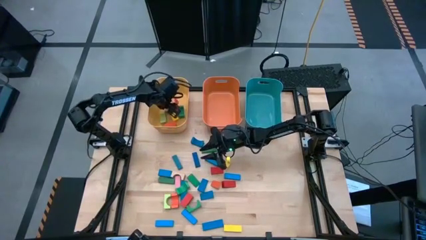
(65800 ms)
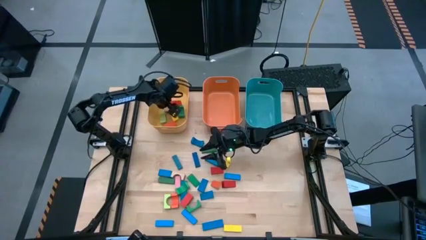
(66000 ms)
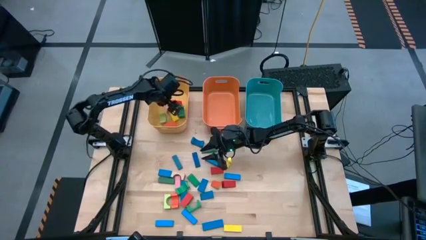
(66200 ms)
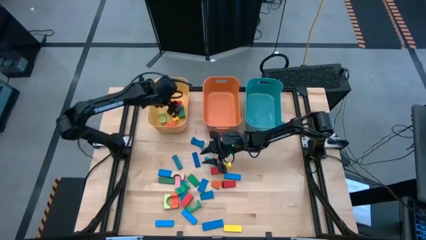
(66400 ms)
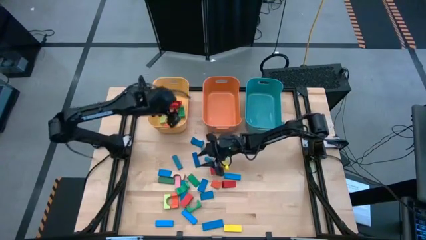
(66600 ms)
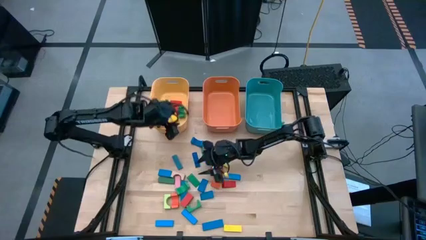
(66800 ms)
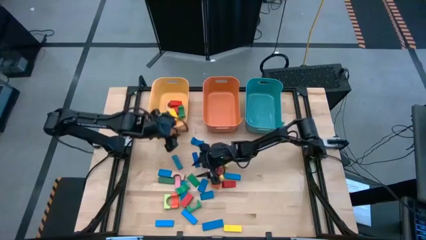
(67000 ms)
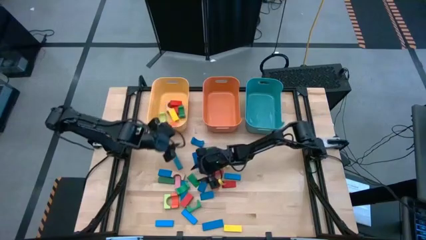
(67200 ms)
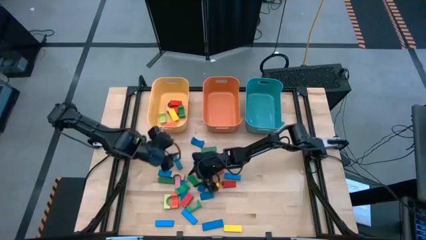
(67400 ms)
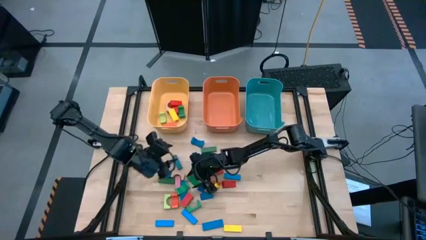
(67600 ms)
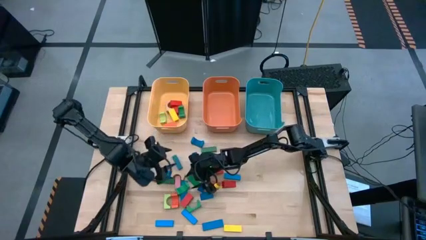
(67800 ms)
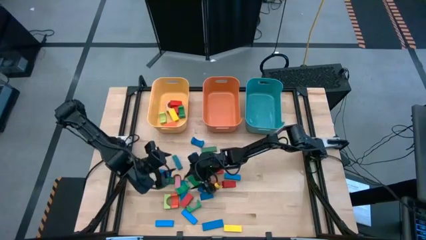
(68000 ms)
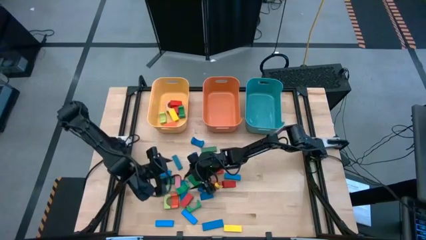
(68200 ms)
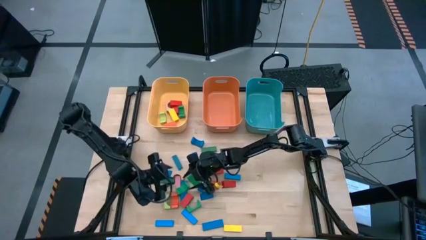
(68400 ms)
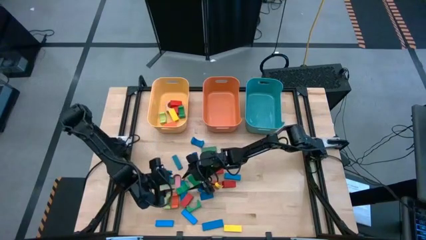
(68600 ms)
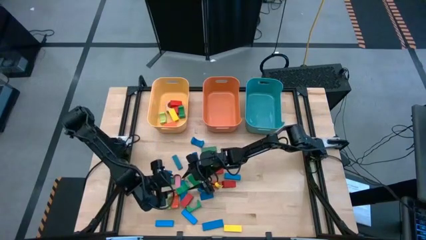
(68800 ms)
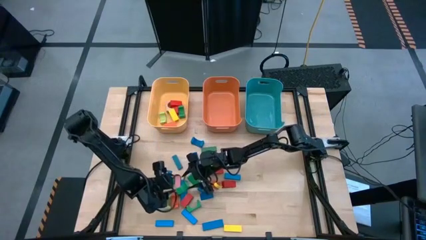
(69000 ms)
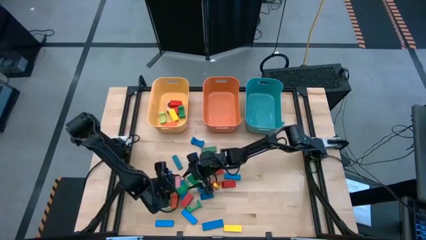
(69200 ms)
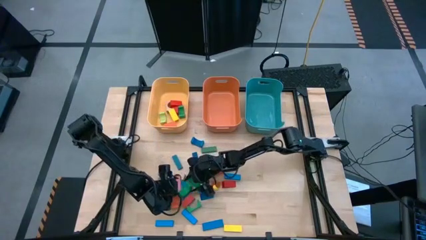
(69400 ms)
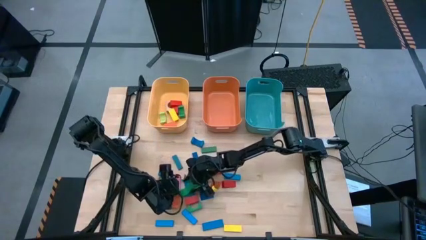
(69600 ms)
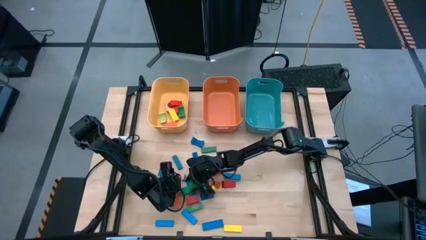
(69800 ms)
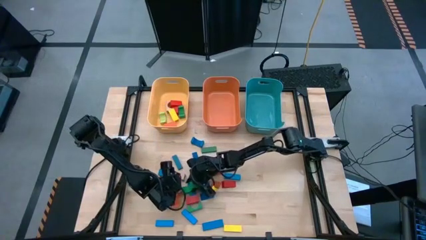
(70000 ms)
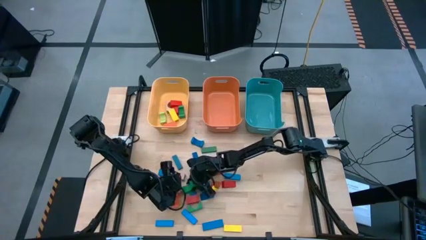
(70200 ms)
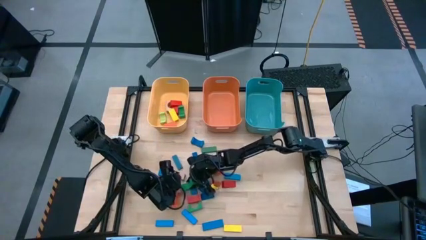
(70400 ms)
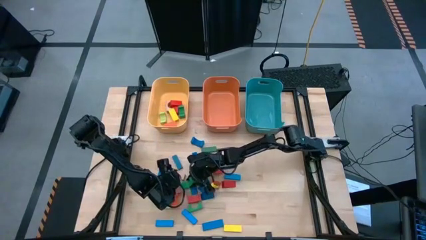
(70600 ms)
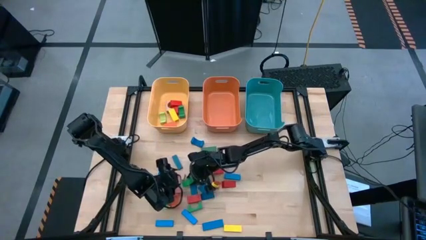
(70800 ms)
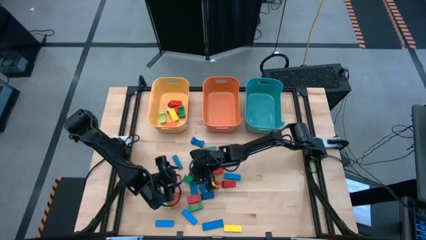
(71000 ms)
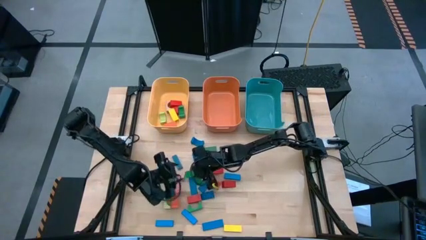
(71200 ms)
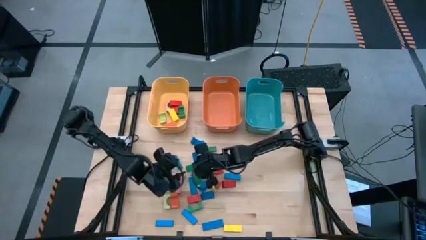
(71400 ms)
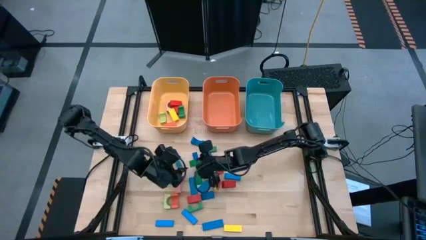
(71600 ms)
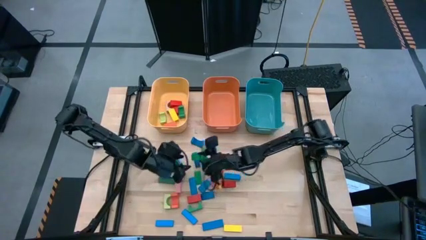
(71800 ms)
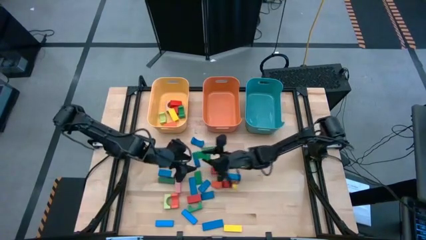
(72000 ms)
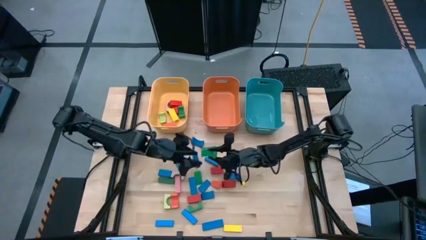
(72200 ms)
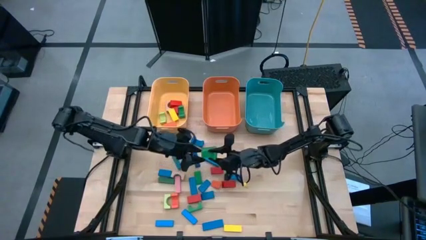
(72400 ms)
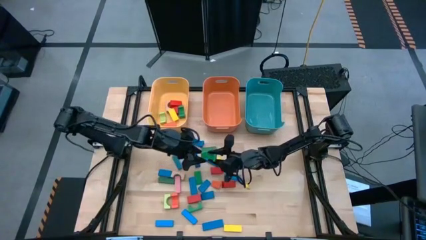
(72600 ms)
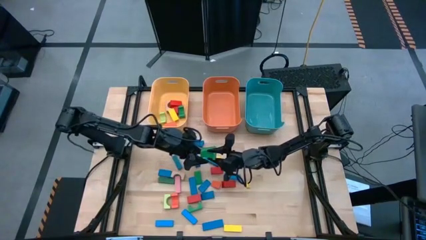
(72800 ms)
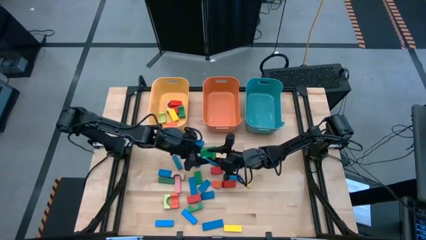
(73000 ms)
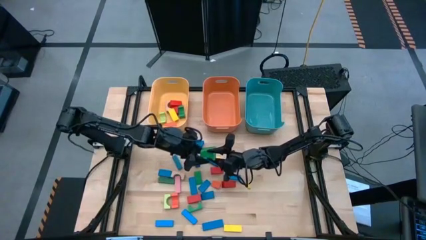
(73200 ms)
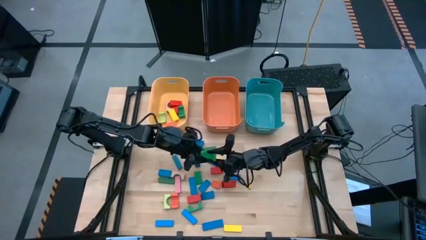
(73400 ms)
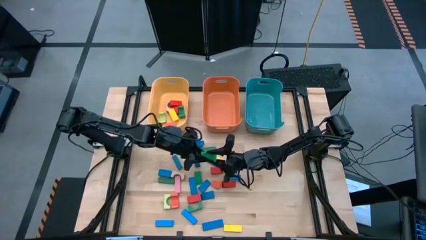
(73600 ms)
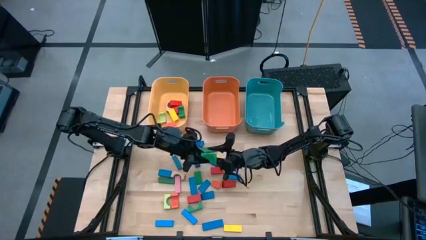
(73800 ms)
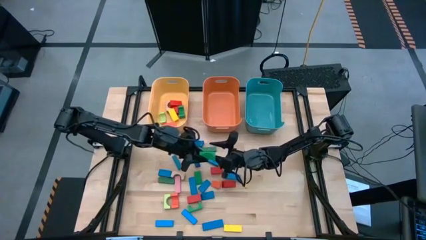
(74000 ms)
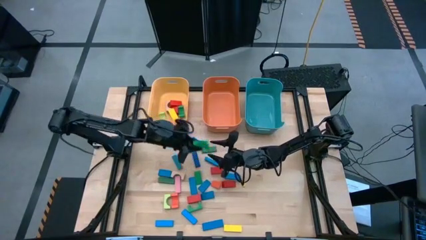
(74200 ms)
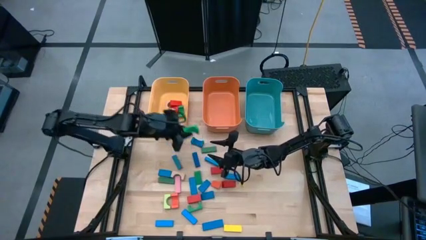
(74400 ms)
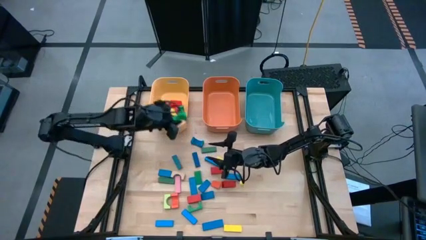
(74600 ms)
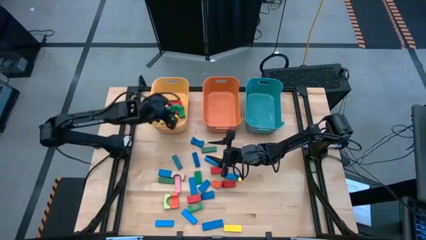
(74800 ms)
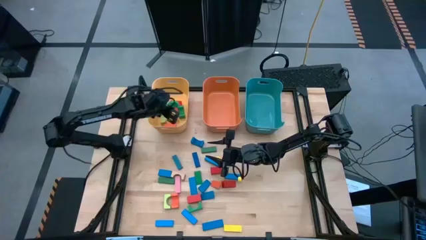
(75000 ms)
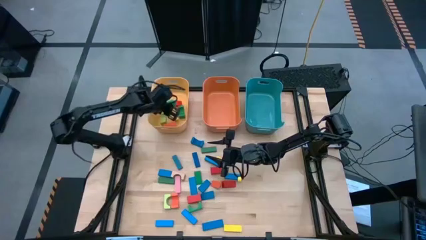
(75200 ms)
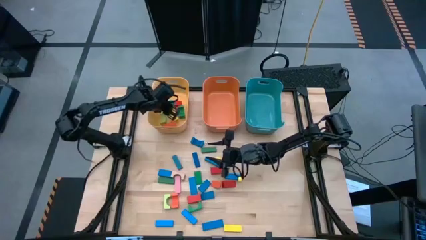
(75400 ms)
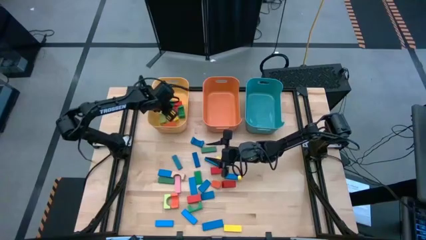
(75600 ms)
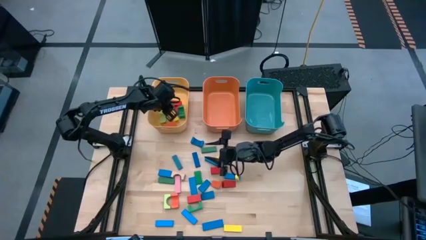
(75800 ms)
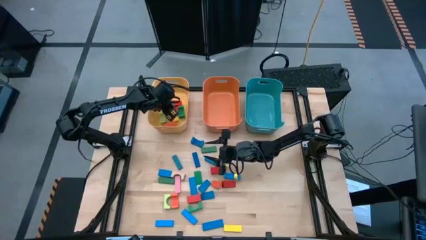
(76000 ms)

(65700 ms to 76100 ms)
Task: Sort blocks by size
Put the green block into the yellow bin
